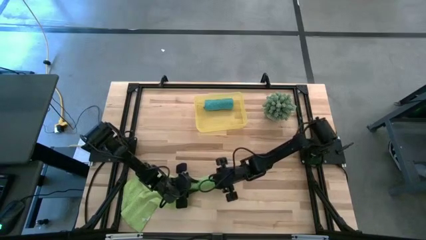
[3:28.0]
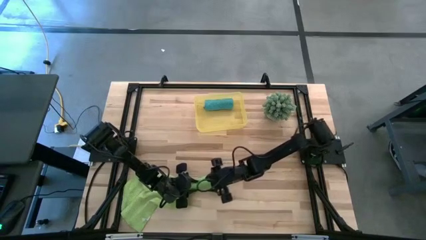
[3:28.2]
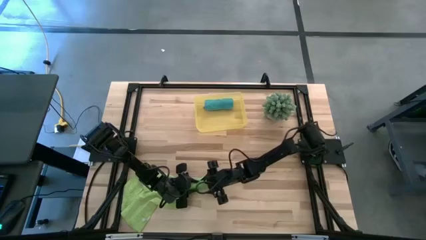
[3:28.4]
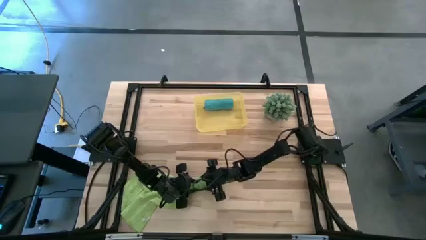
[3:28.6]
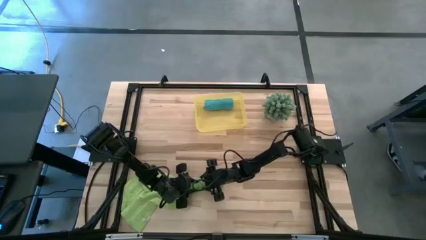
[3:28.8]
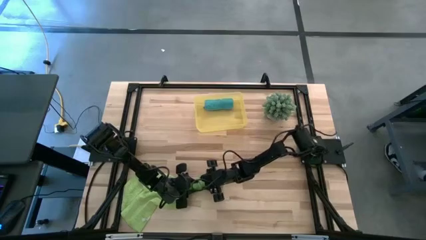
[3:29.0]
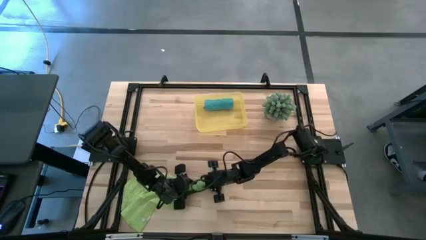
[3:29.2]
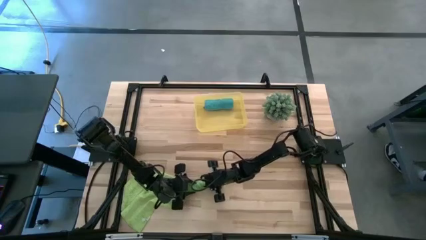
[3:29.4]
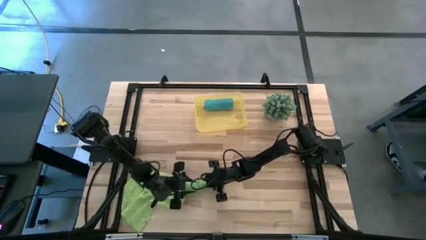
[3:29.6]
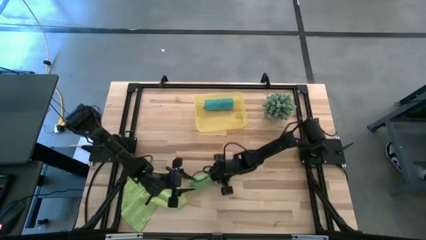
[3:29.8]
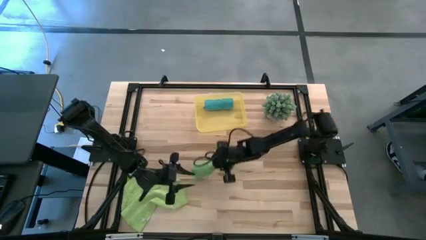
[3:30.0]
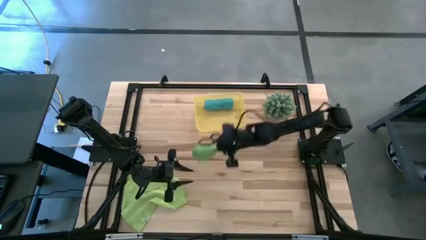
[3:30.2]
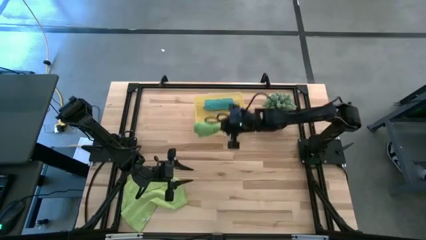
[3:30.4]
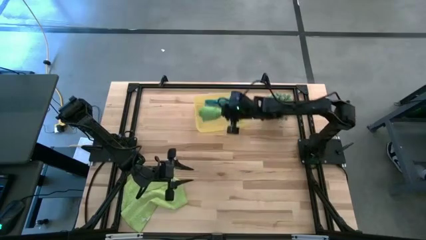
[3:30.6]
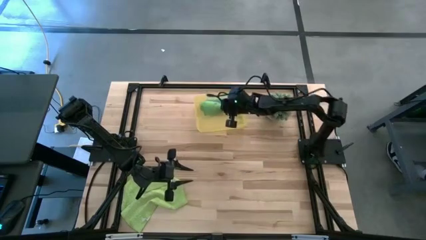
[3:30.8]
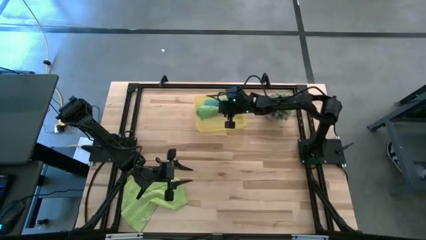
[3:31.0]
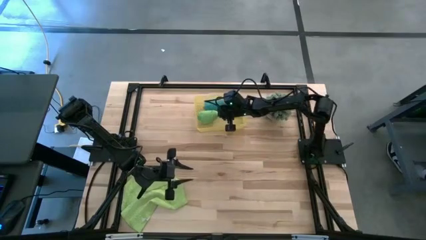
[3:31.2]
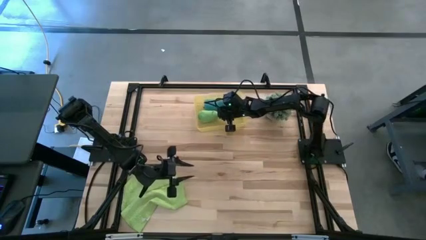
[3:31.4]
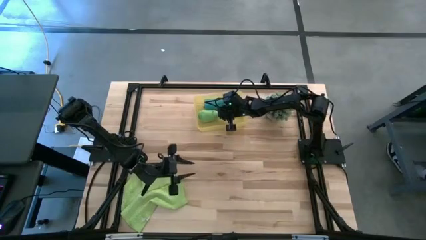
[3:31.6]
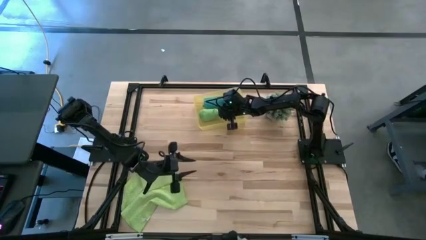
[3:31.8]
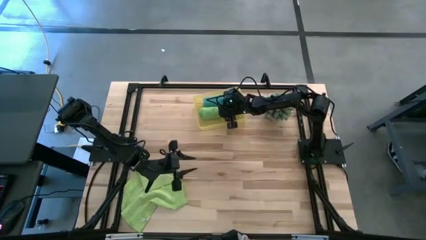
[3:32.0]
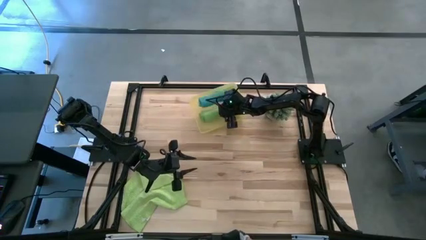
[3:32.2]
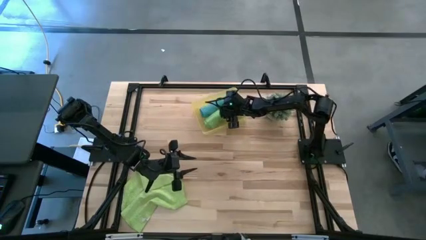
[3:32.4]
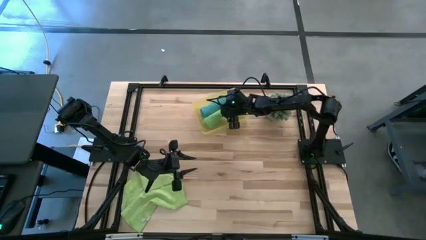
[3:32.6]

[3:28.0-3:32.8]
Task: Roll microfiber towels into tight, uniform cylinder then place into a basket
Put the green microfiber cloth into the yellow bin

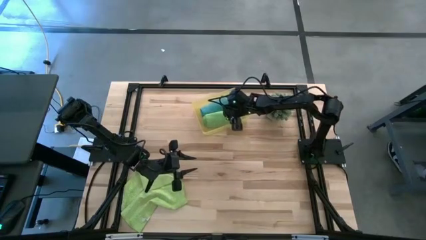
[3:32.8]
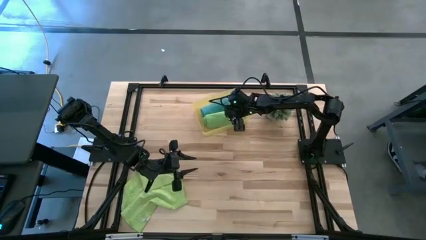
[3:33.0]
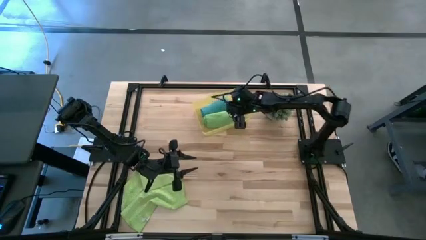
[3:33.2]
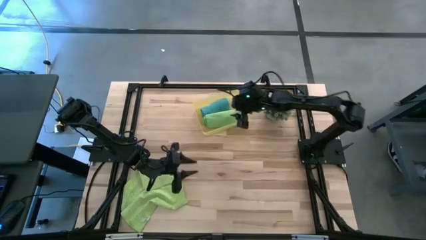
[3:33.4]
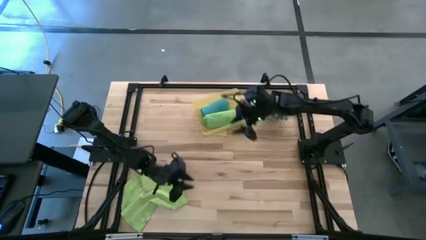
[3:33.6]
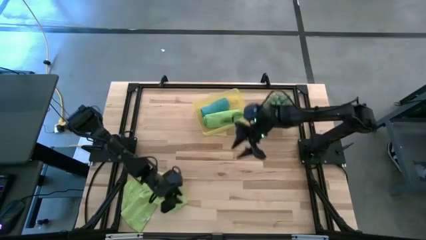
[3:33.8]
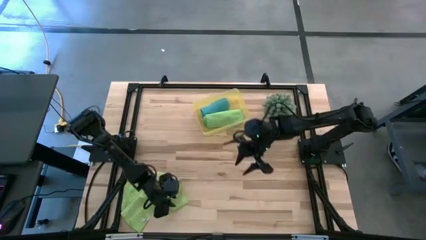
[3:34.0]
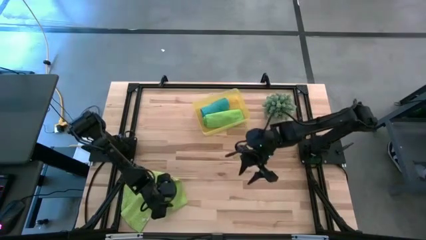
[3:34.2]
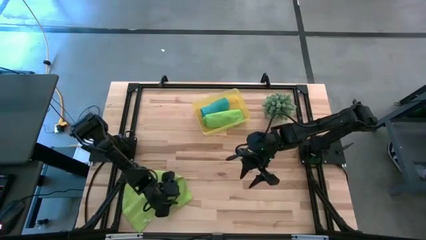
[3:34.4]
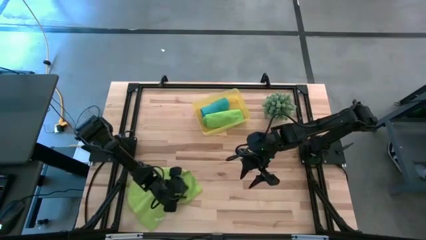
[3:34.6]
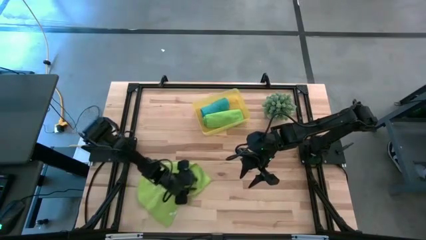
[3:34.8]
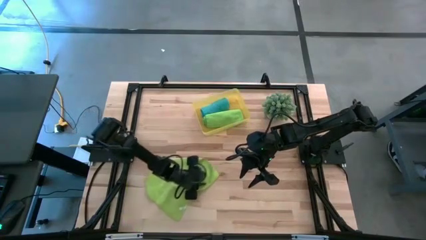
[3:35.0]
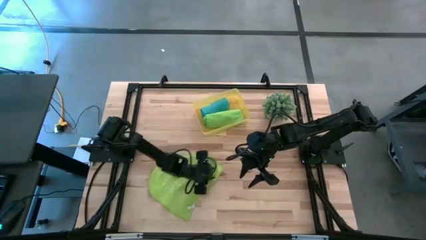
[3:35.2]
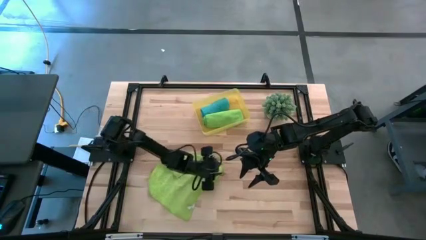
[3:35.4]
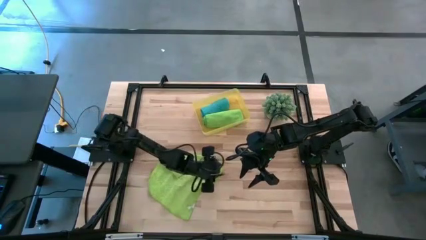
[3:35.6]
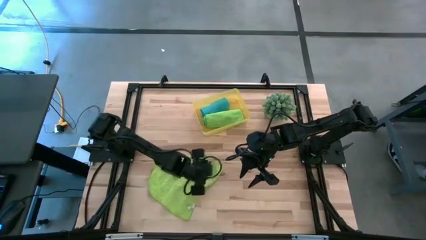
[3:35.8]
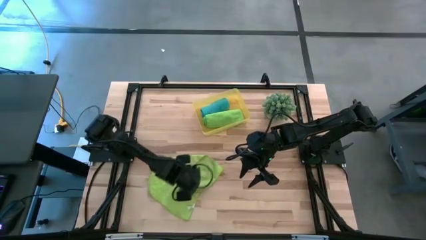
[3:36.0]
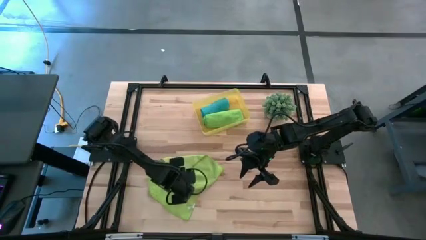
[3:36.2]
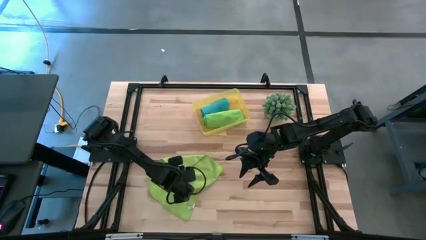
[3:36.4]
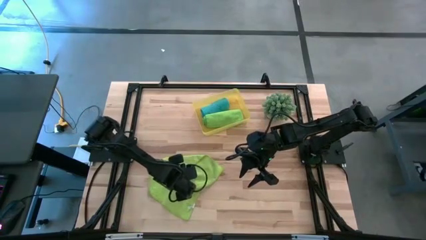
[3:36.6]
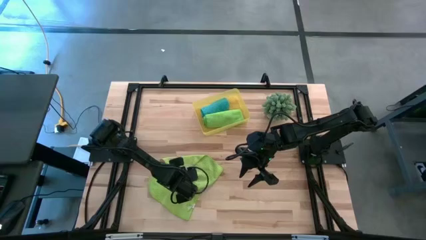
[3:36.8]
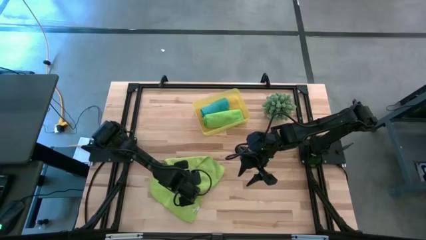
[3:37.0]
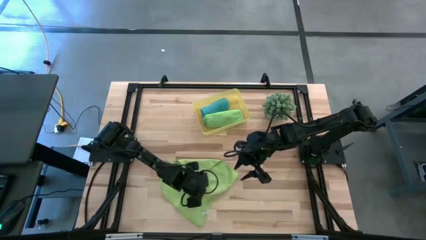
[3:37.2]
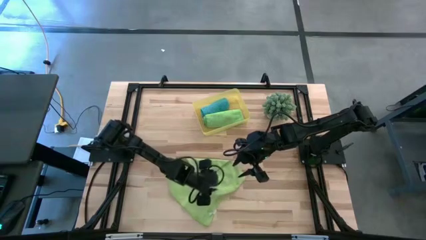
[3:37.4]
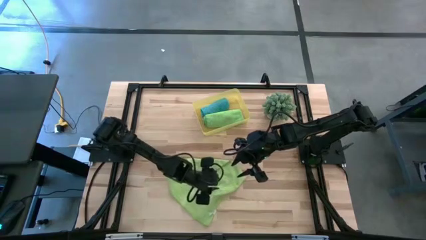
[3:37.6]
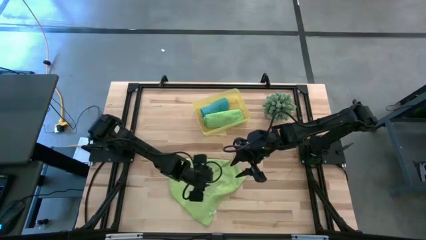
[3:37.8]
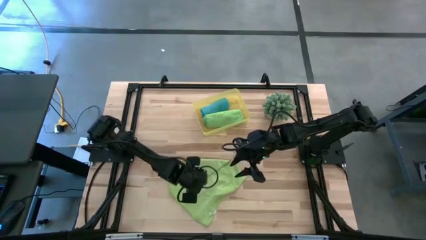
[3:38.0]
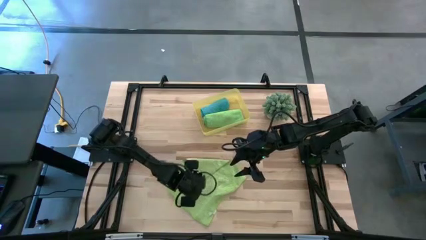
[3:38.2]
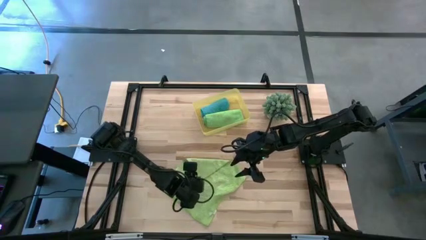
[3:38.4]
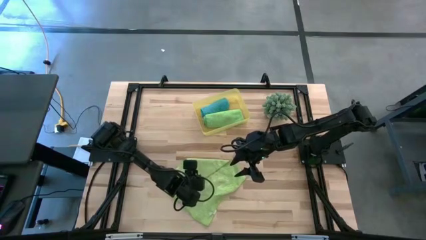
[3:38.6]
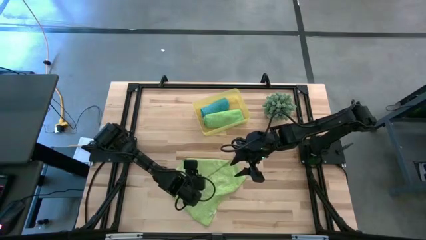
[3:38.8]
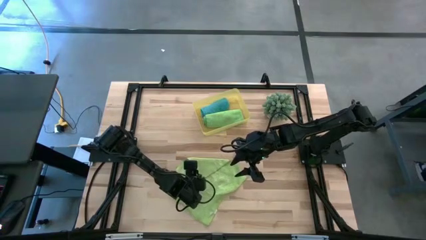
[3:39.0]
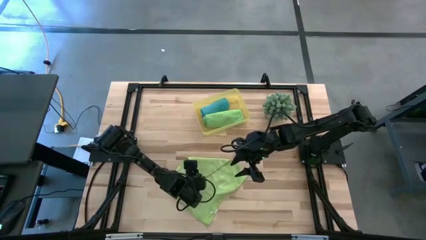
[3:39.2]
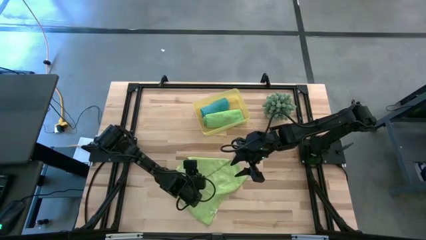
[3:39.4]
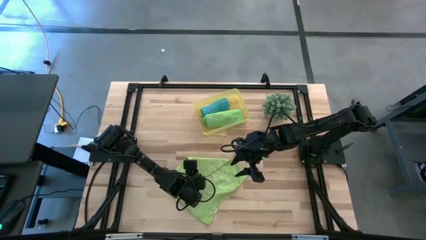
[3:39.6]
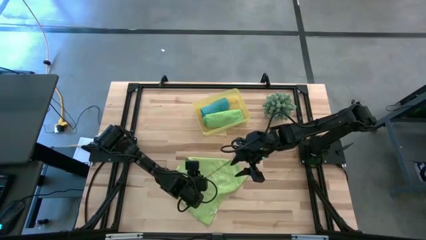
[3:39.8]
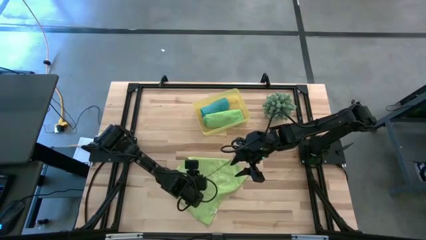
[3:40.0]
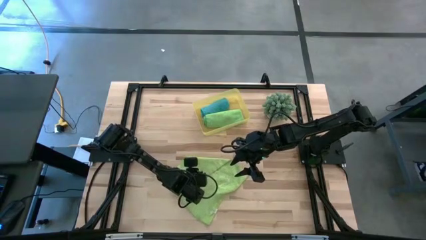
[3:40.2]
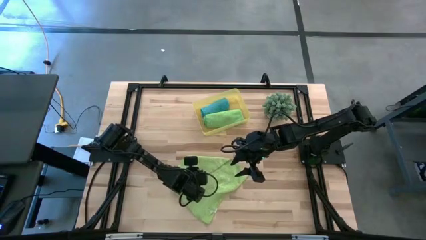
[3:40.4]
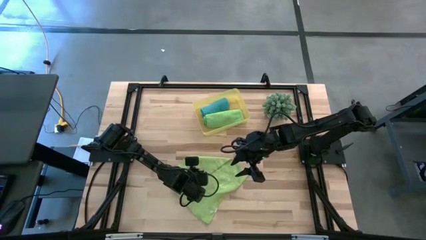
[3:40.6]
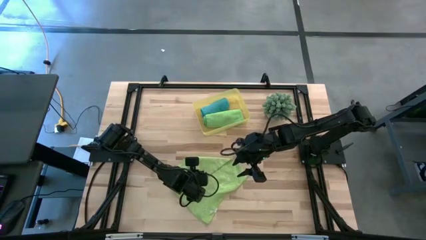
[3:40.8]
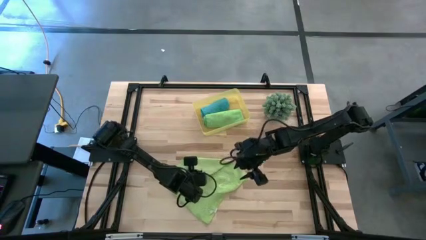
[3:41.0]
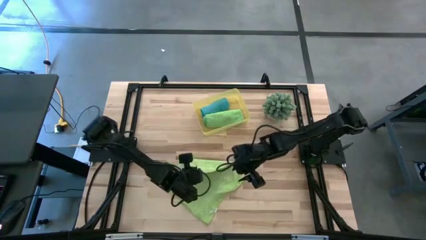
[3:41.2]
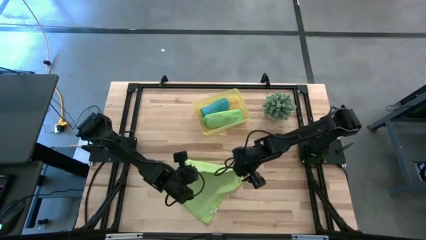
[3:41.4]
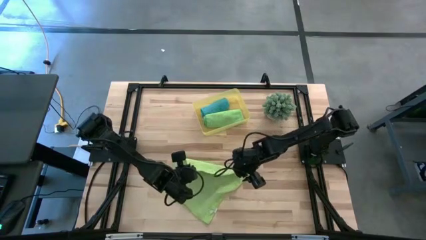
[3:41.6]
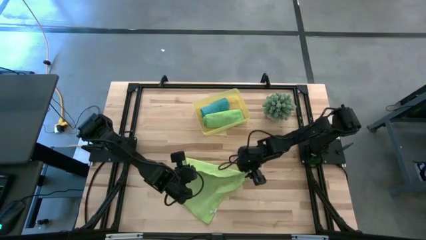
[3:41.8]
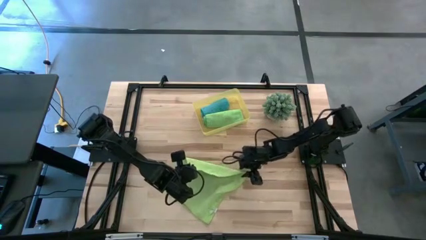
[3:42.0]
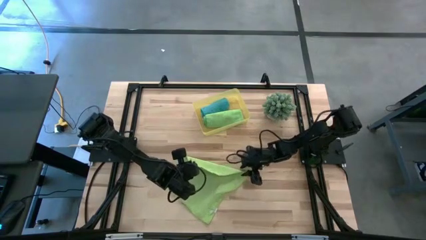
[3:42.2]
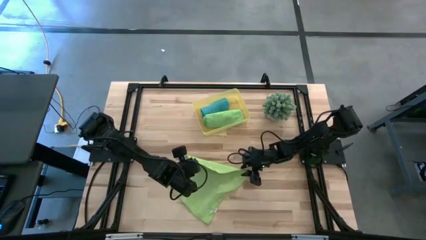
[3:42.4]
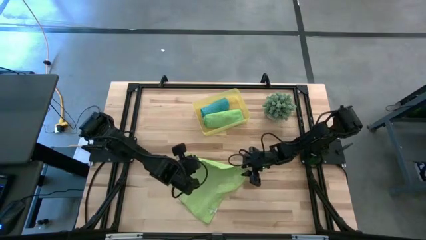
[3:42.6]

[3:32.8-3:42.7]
Fold the light green microfiber cloth
